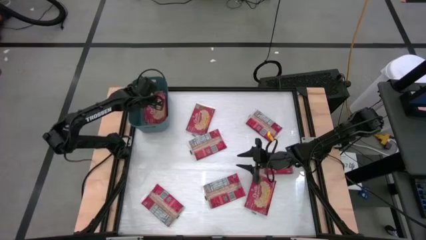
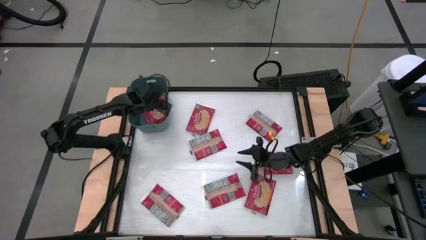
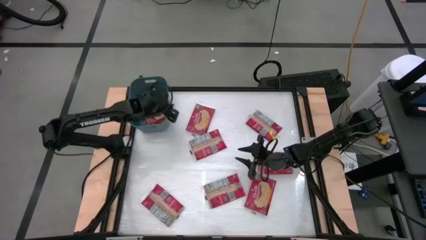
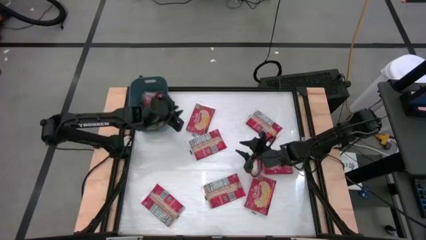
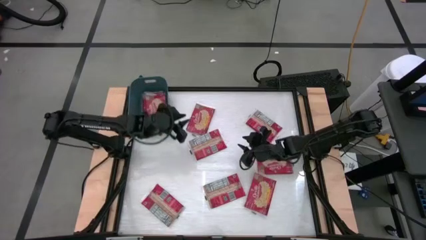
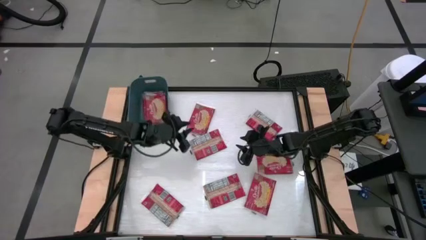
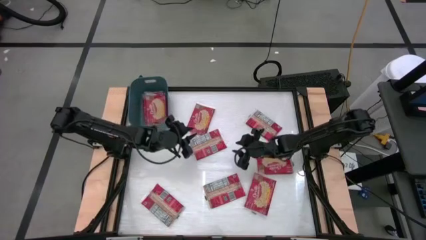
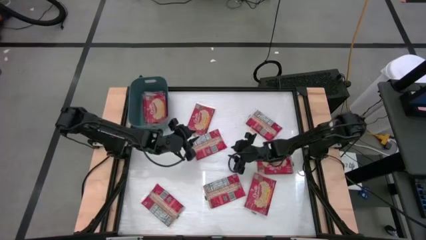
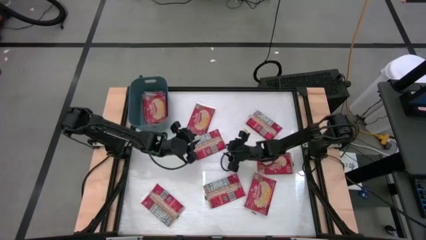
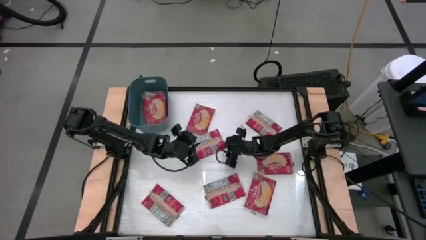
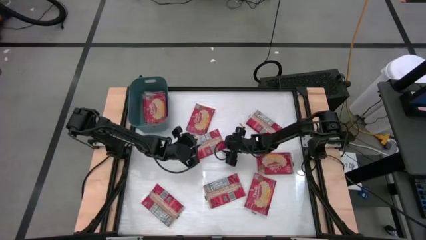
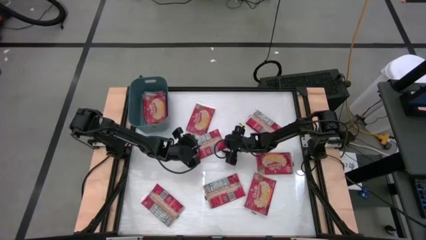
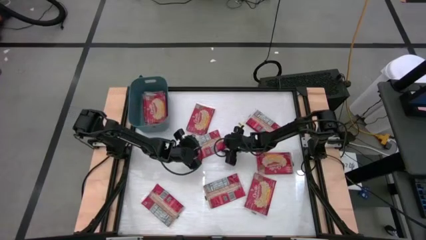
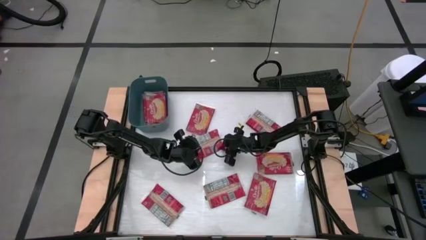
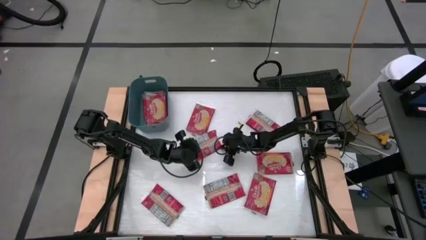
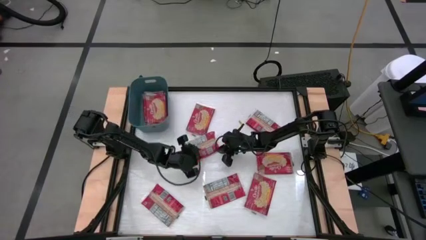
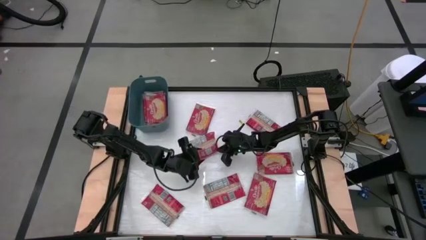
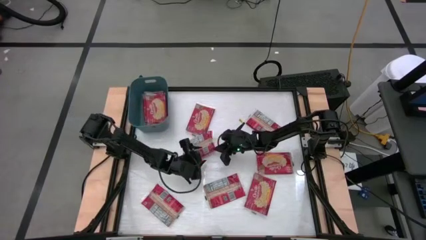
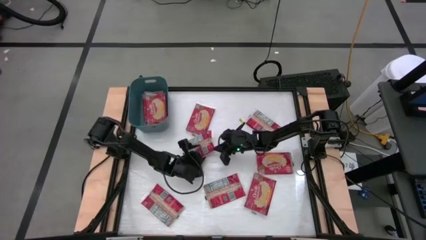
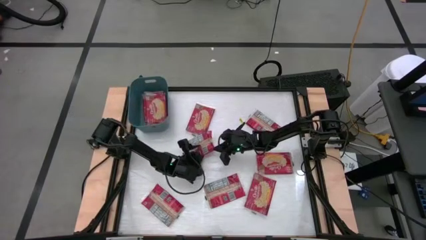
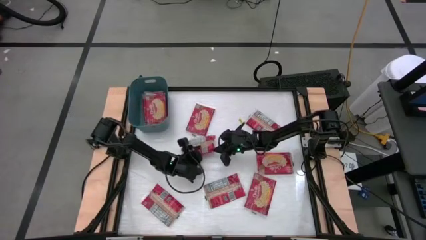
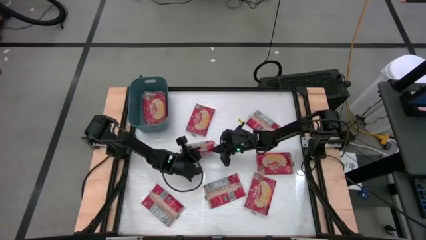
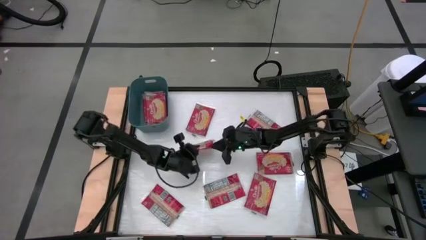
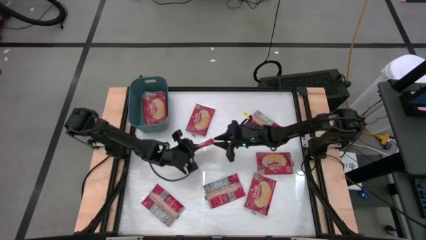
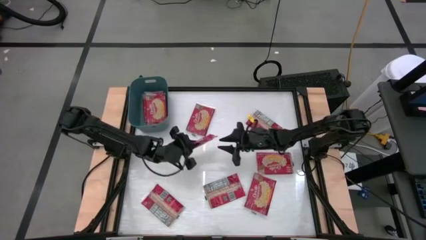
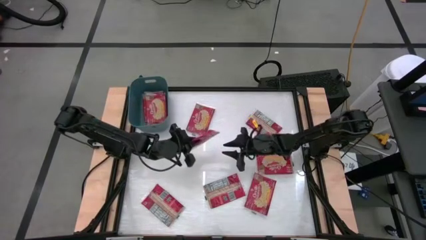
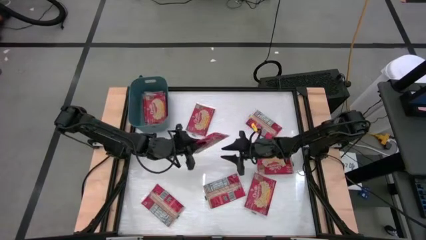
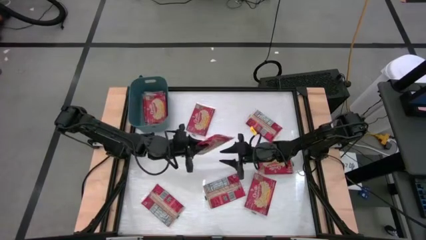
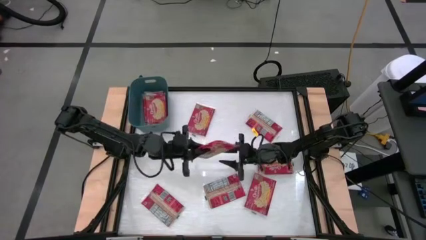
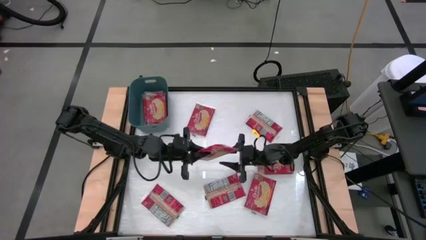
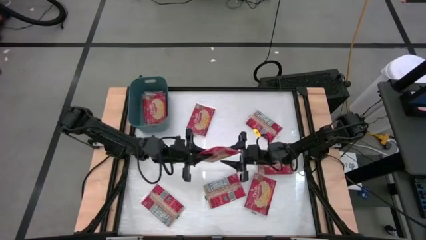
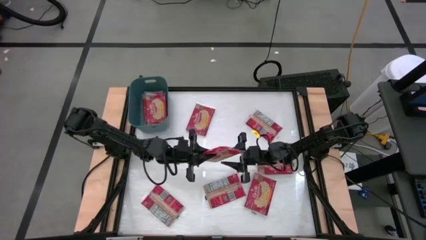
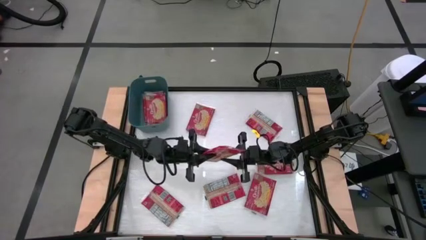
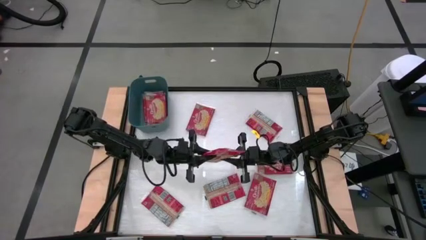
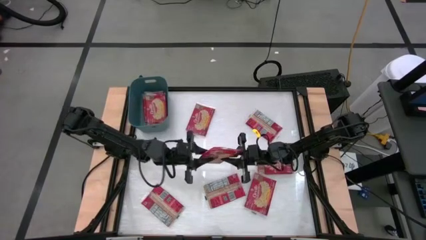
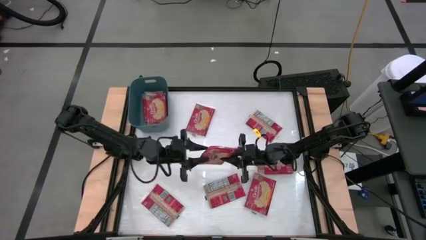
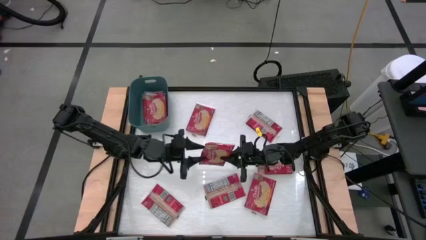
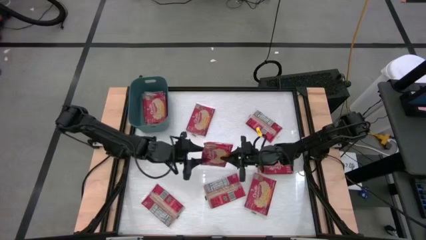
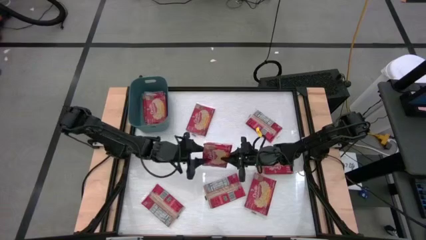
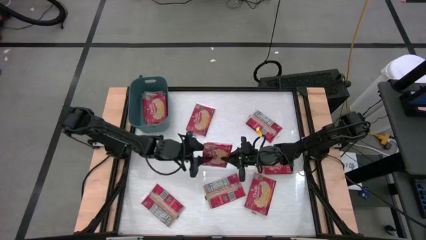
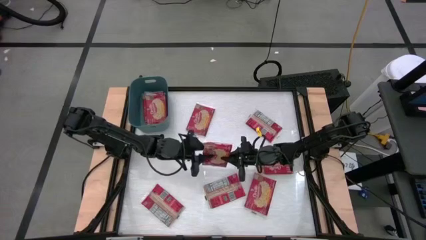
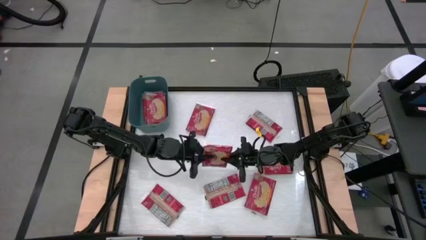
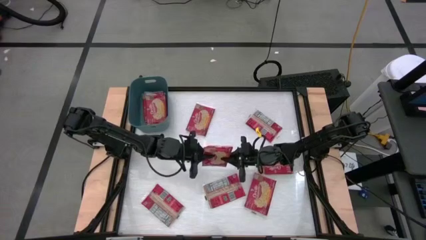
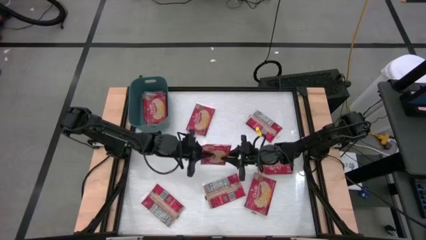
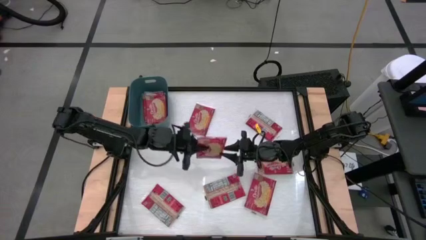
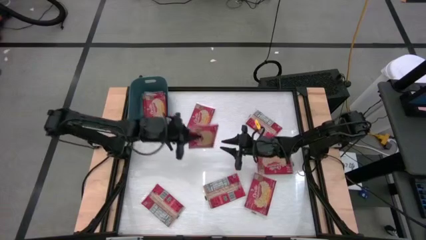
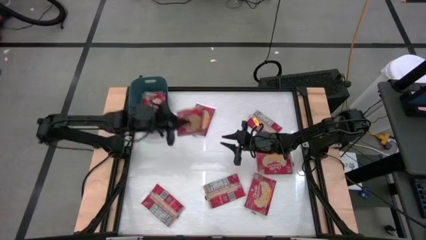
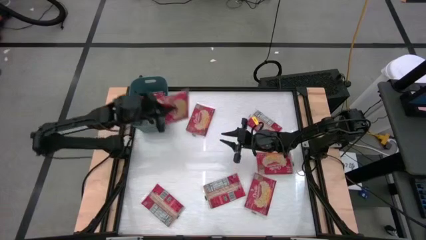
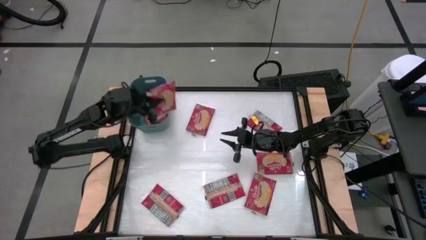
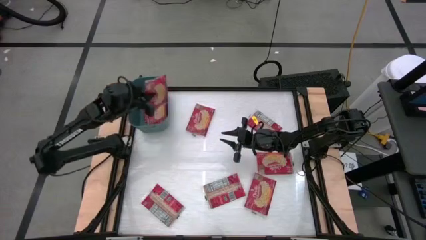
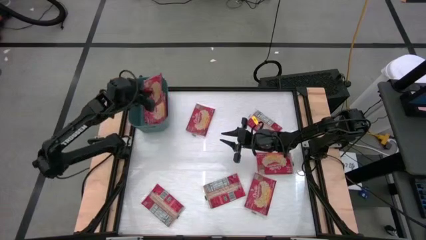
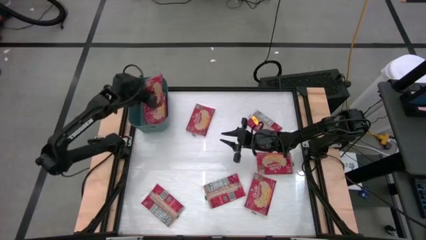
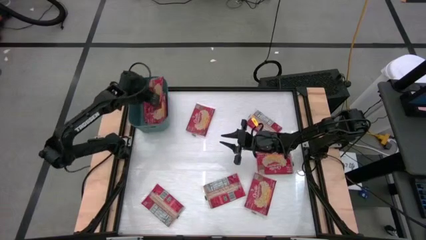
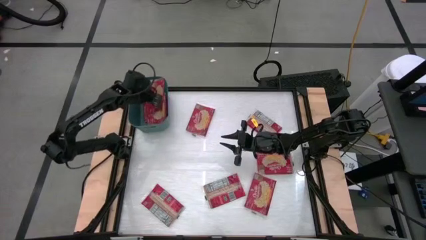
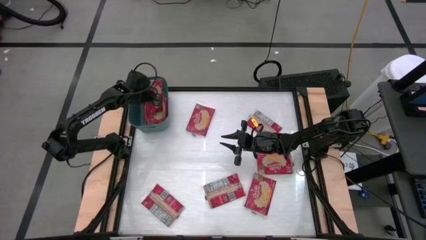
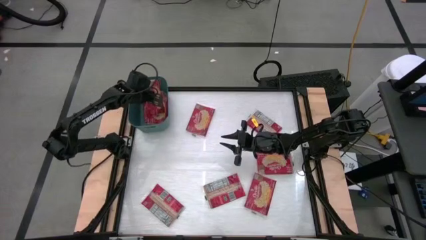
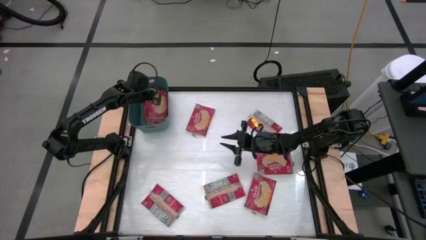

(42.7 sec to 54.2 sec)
Task: Sort popcorn bags into baskets
Stack the red popcorn bag on top of the other red popcorn bag into the blue bin

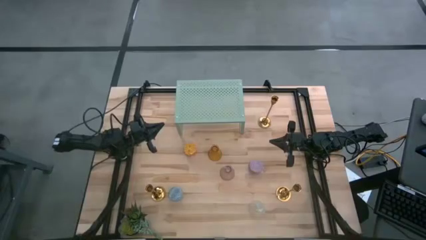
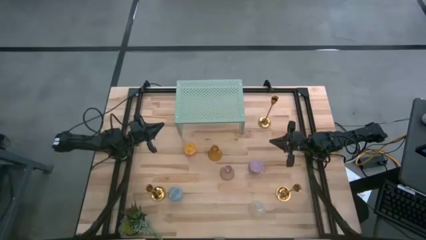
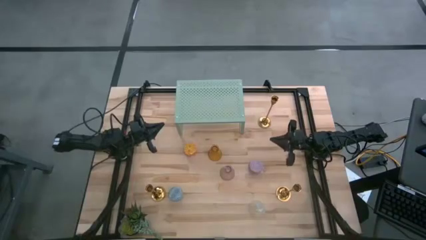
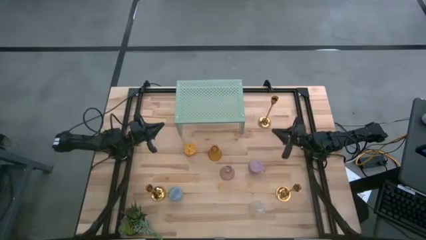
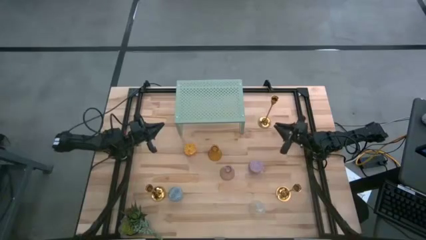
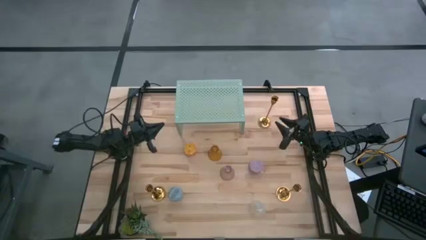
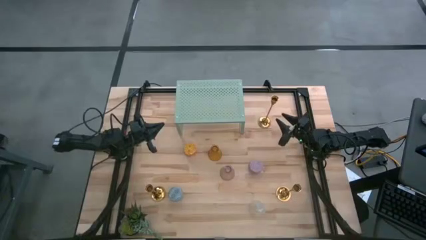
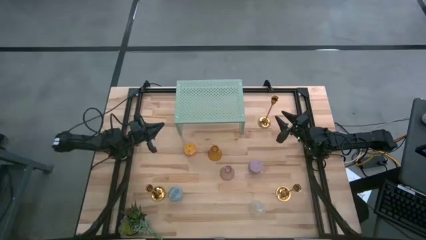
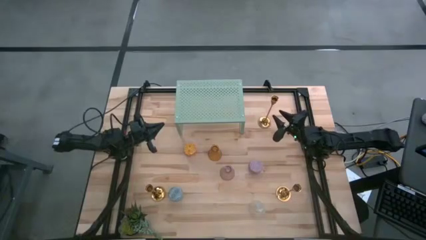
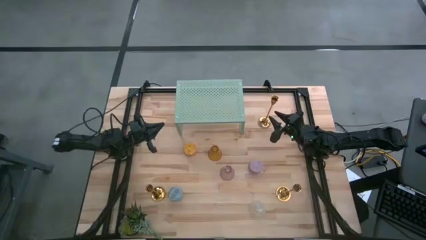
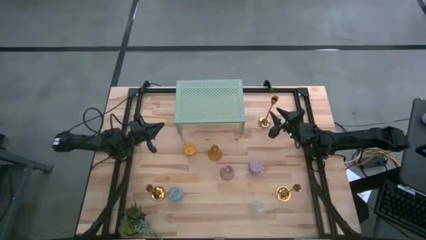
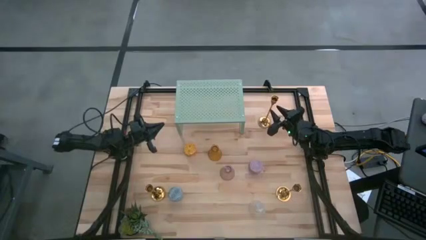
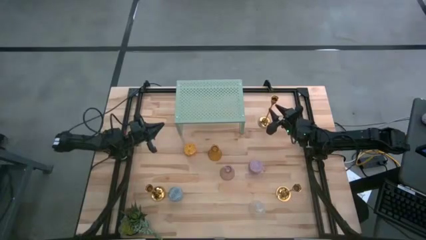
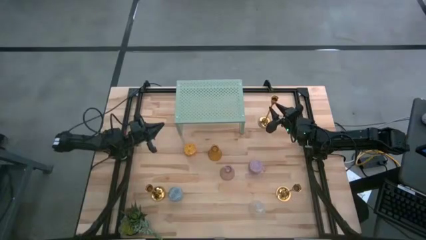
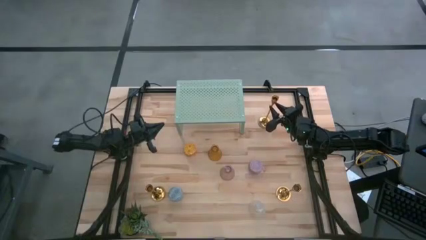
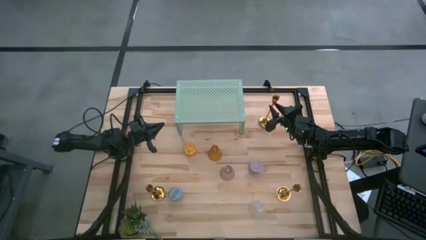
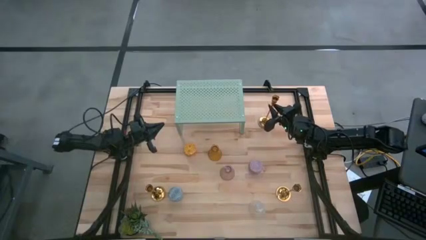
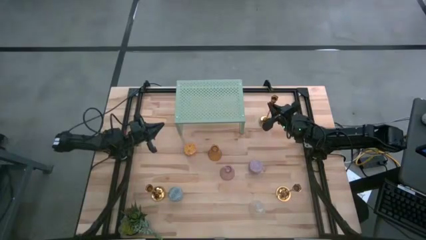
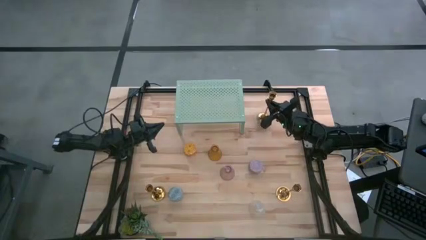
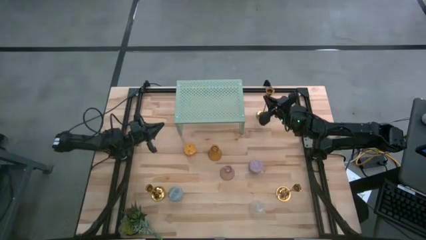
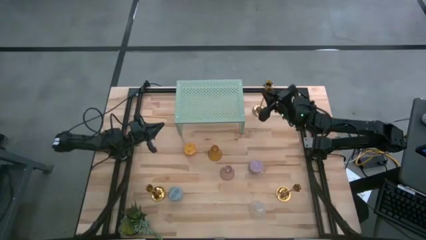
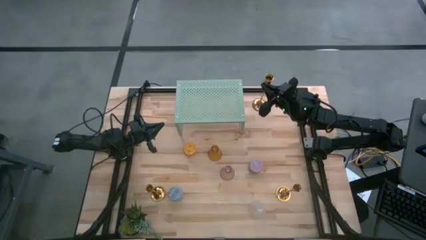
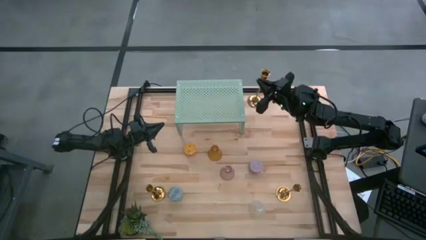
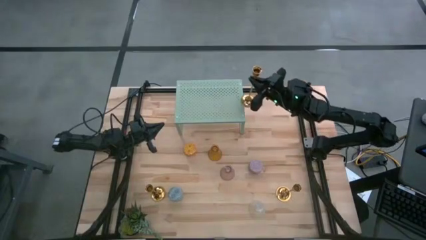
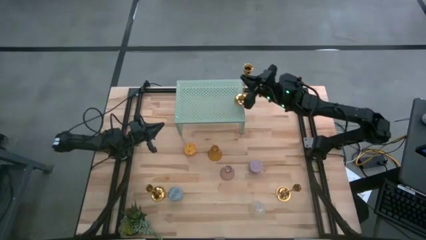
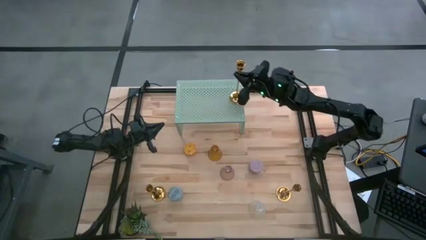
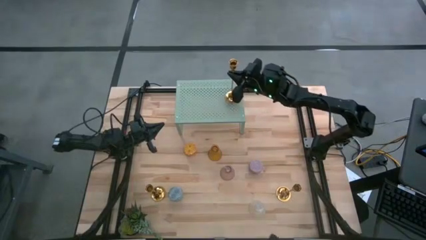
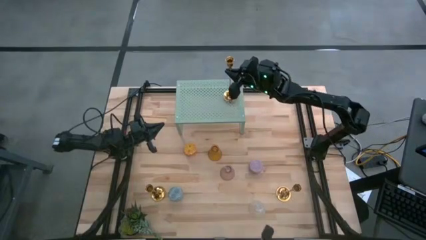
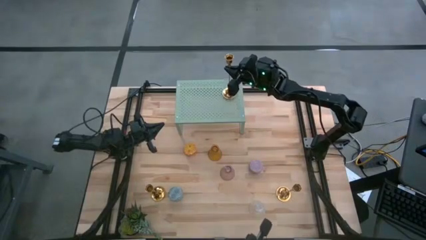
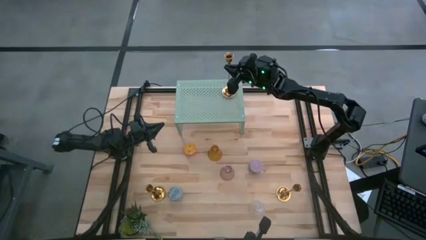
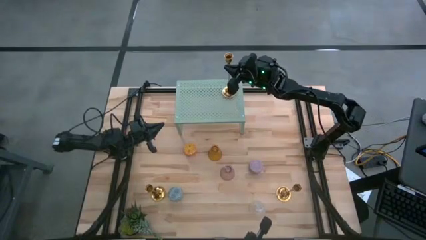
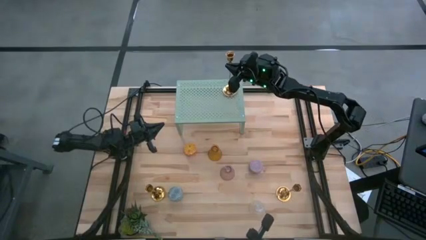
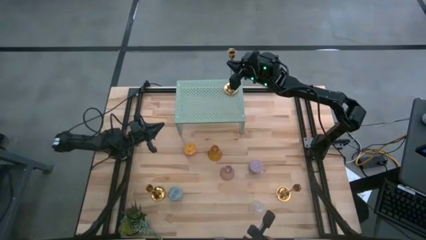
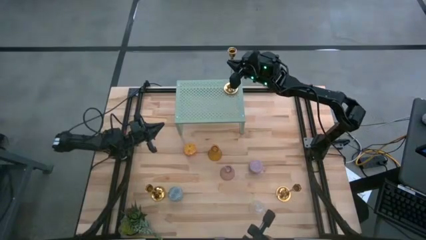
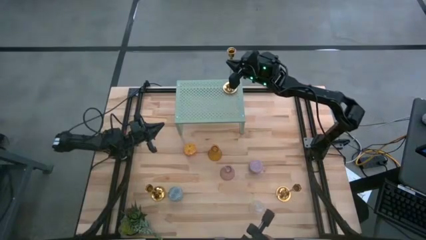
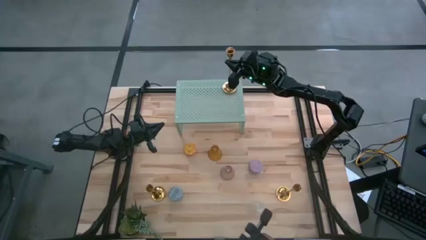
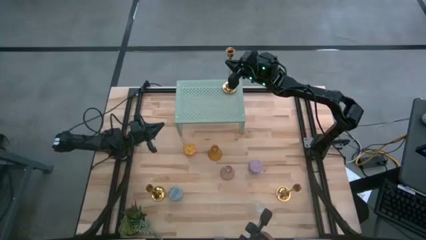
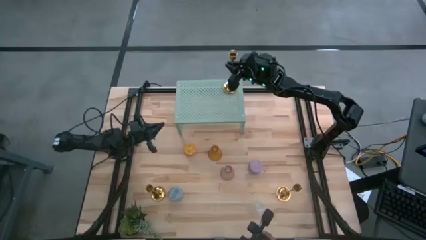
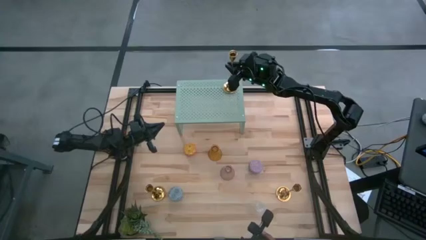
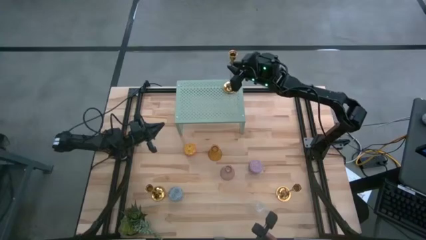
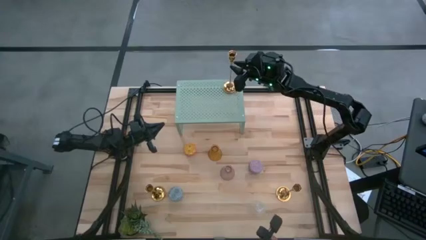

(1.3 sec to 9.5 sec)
Task: Pick & Place candle stick holders
Put the top right gold candle holder on the shelf
